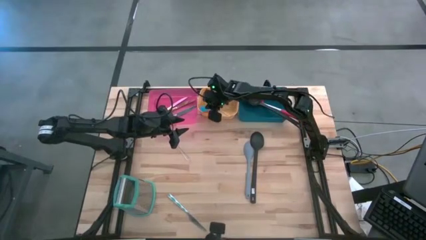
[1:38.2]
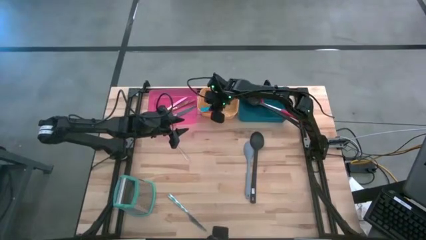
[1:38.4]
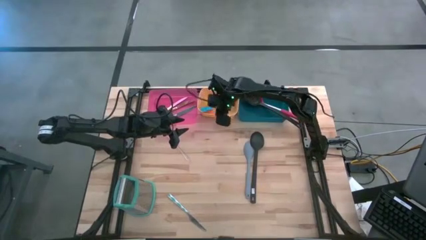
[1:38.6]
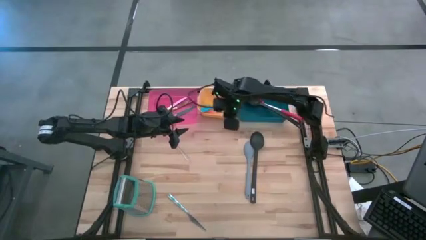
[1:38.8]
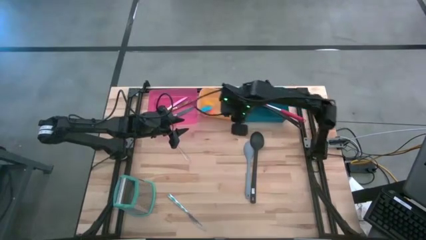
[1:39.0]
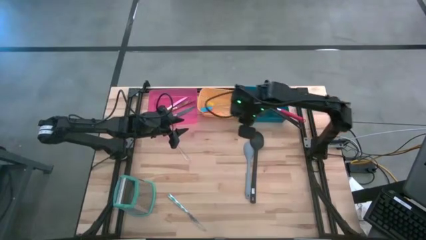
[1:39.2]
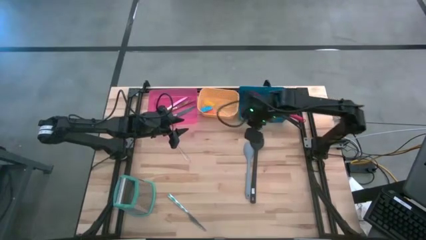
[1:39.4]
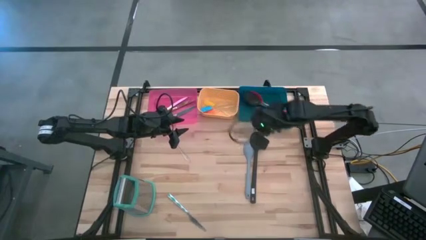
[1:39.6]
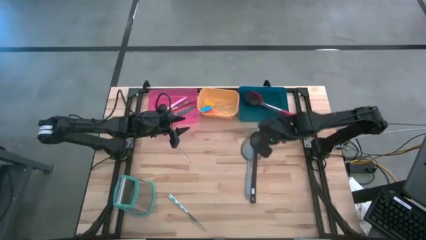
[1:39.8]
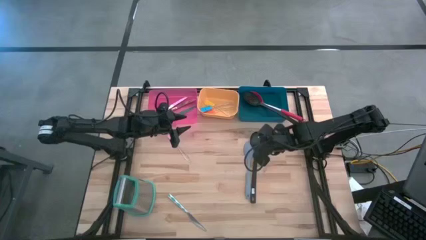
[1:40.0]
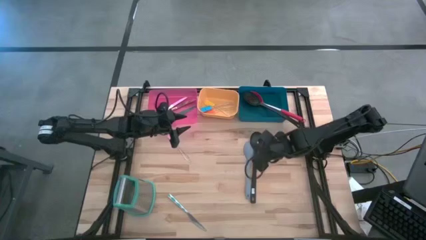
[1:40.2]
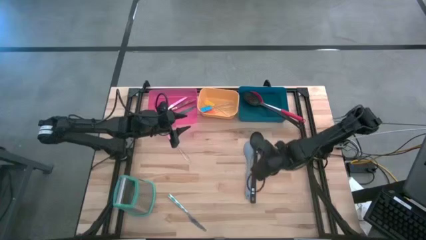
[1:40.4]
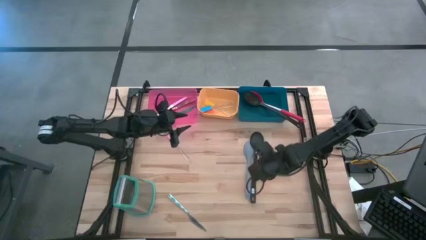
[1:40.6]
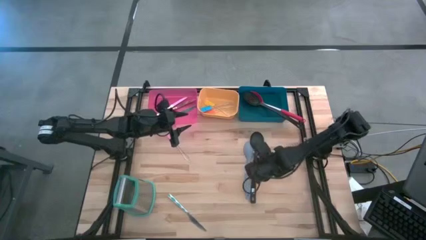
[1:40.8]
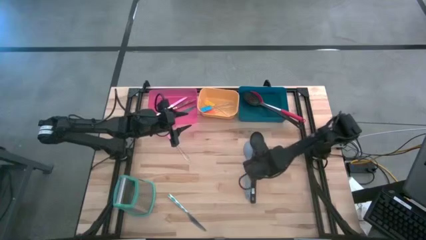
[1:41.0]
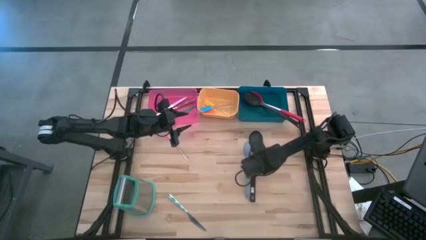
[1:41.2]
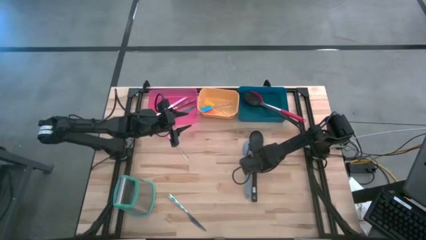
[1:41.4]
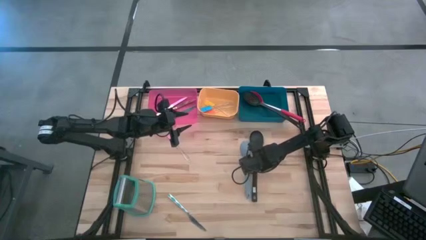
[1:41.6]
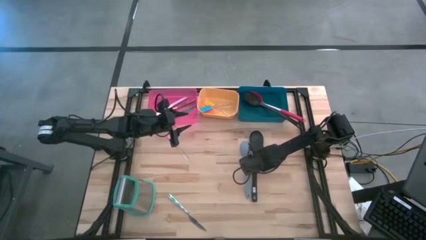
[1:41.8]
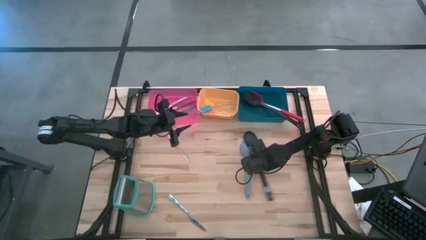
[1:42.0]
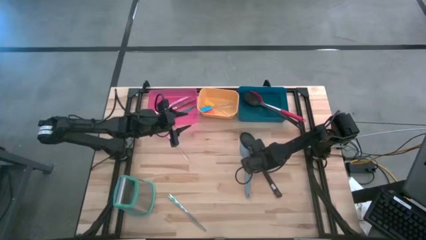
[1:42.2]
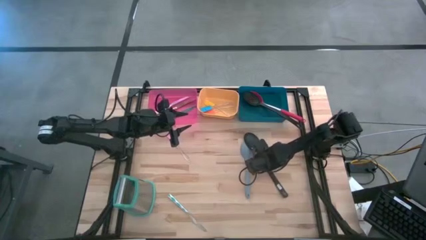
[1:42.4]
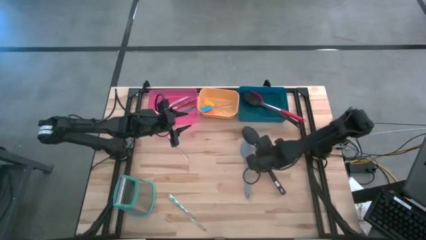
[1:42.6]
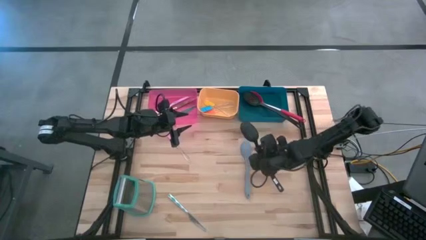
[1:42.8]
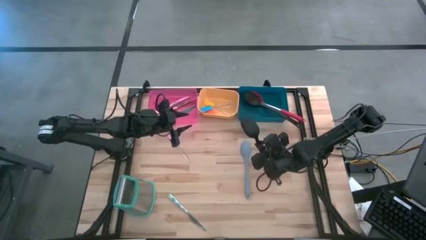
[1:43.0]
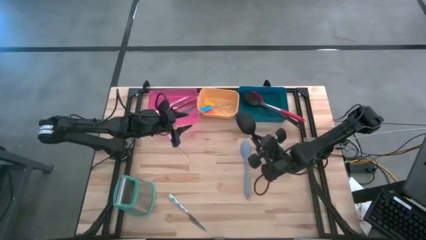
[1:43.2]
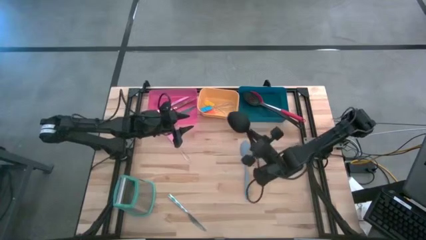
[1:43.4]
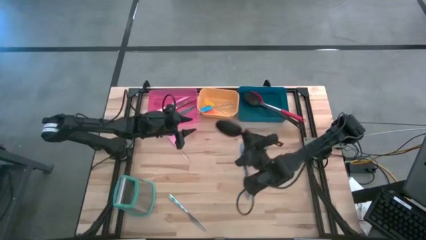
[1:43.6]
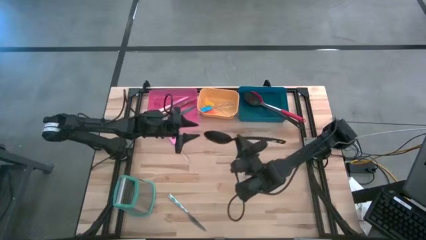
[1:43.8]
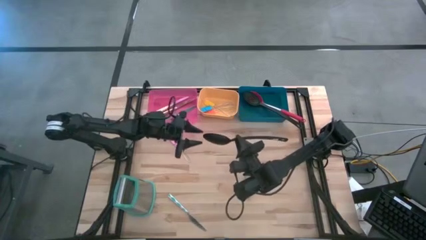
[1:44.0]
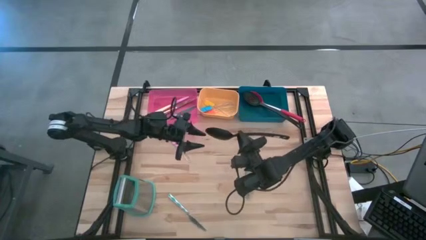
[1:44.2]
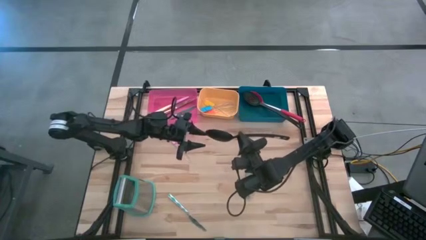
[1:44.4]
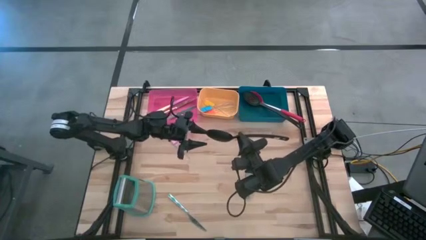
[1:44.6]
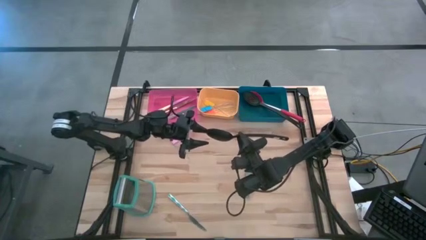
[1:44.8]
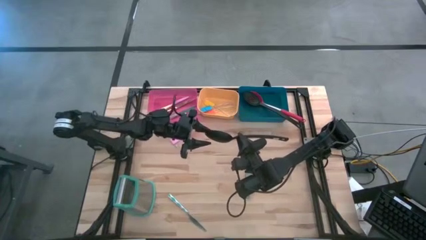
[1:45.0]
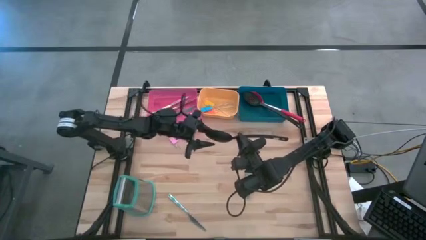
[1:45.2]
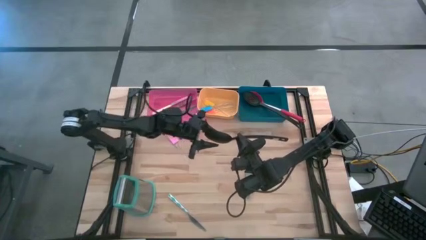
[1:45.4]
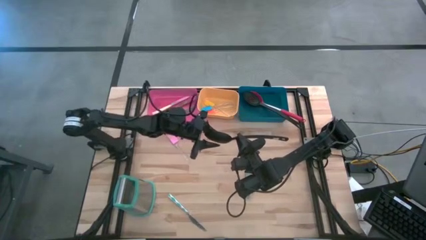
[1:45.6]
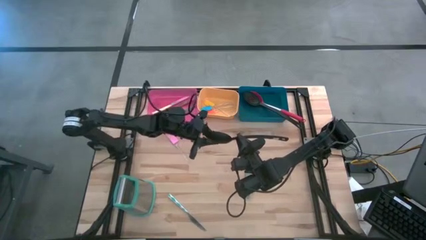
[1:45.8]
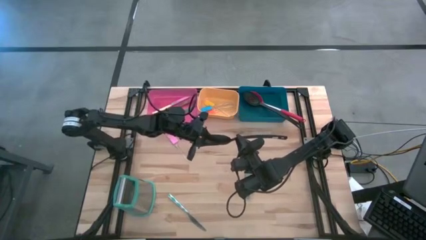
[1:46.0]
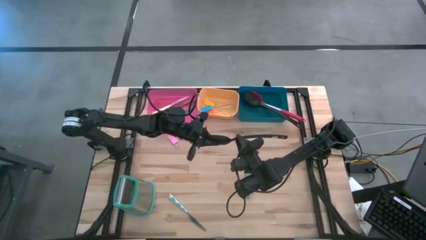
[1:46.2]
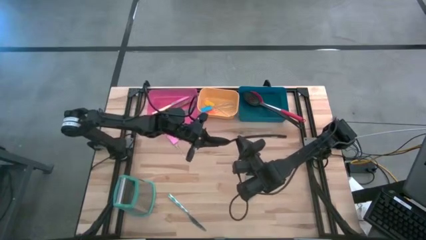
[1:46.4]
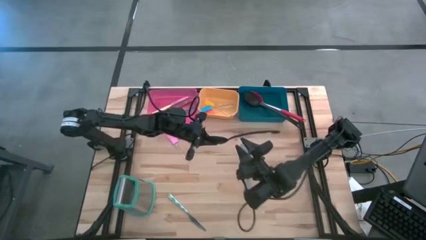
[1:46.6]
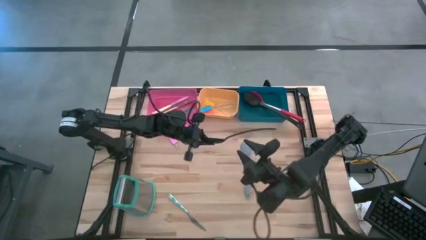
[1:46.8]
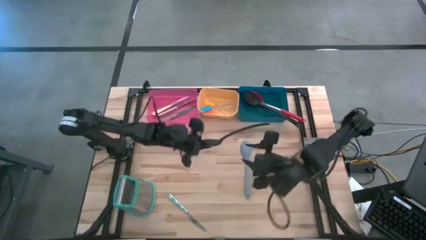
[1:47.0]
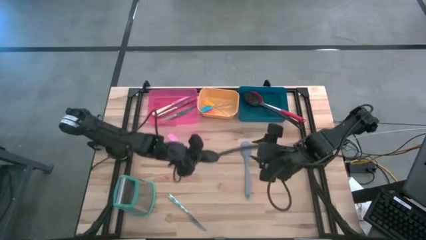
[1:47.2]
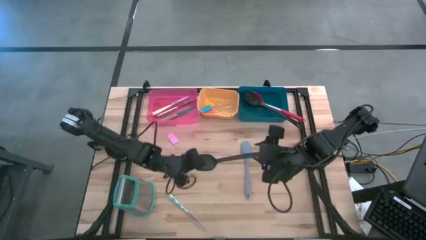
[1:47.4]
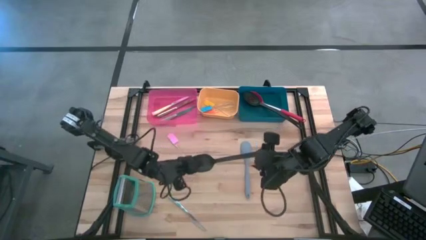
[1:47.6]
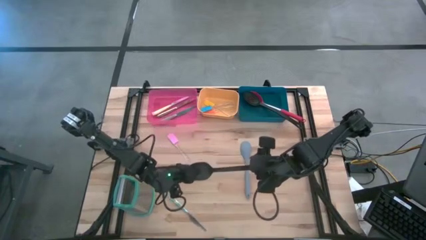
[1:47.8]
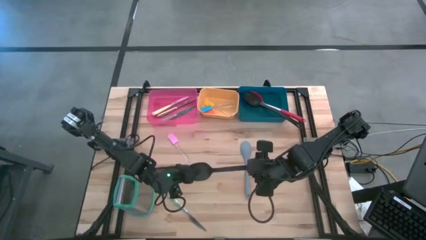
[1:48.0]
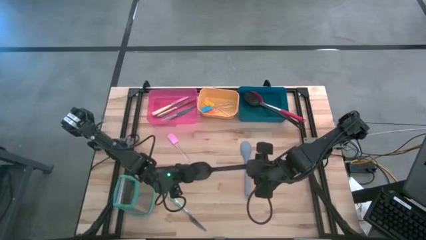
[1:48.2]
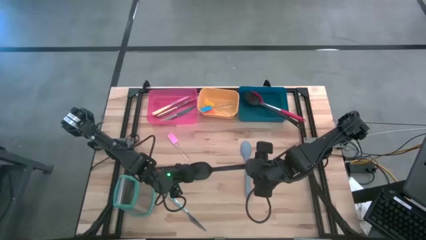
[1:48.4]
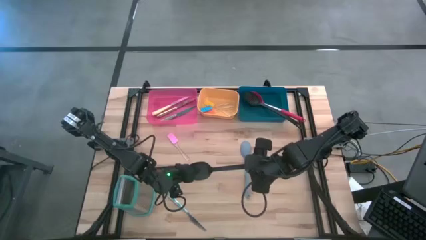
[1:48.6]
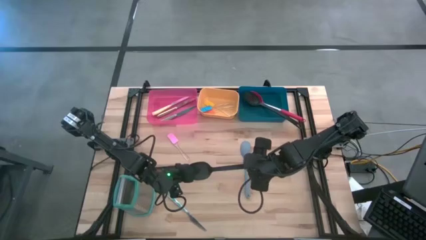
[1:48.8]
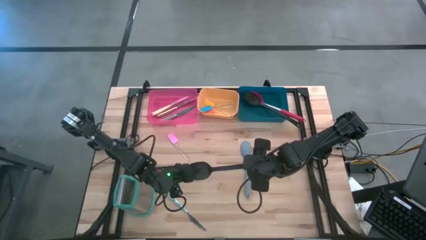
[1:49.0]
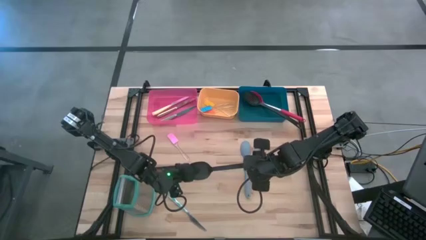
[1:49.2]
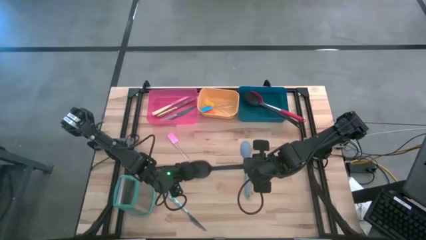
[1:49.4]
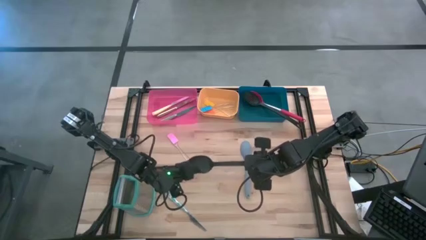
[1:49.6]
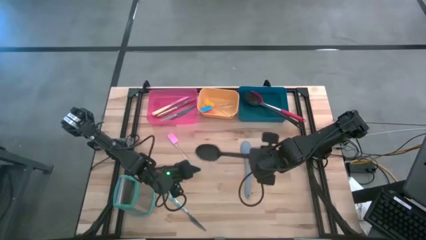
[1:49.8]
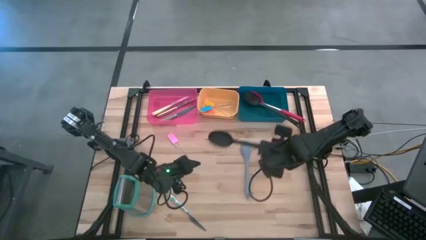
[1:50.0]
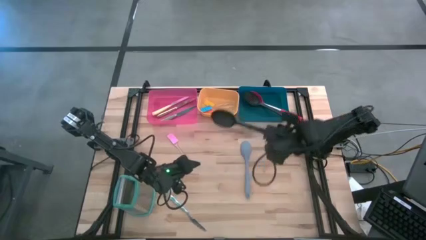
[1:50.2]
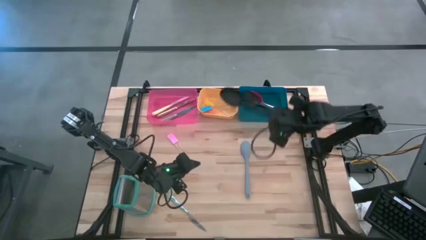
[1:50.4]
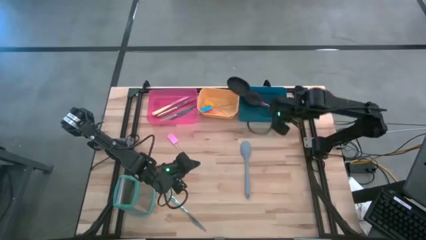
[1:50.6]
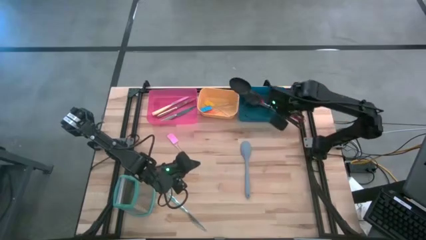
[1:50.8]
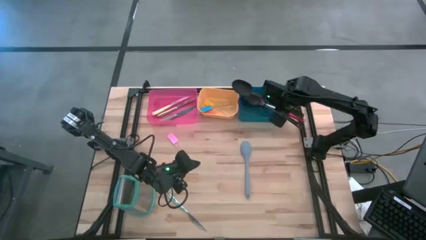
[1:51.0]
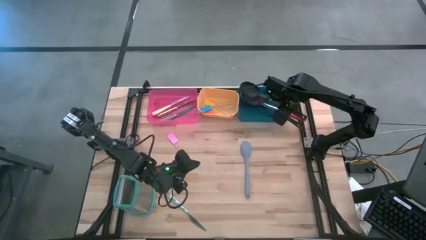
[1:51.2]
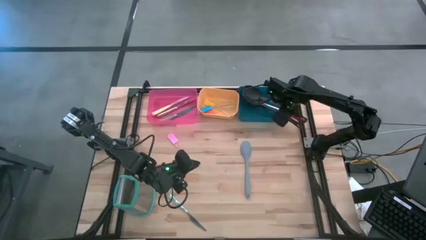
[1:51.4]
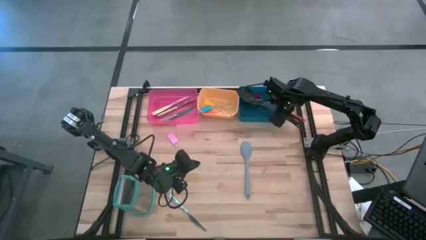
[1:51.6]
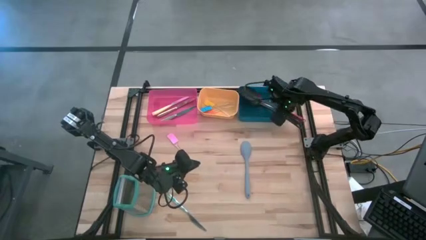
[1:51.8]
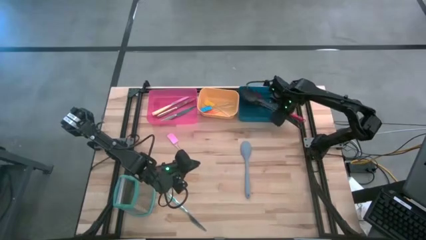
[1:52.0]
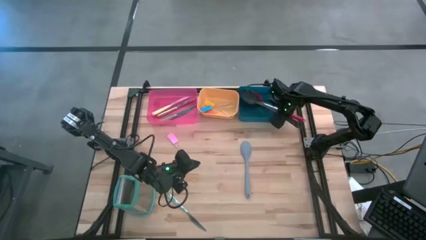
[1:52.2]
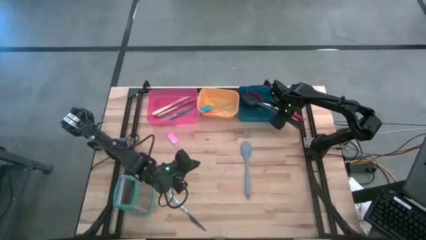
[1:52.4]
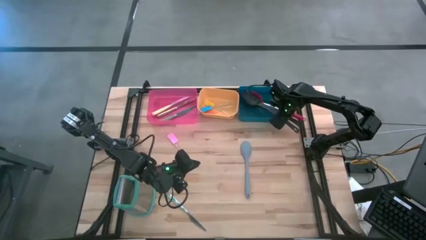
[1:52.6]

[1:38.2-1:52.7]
Task: Pick & Place Kitchen Items
Put the black spoon into the blue bin
